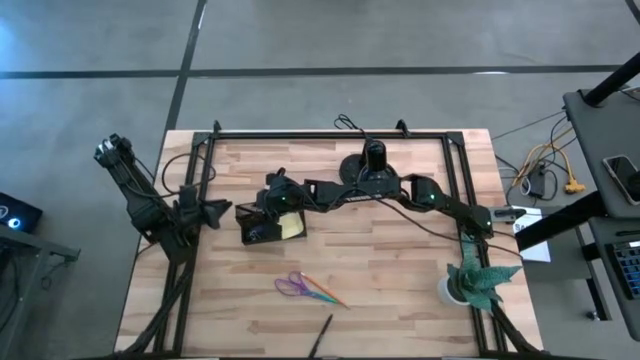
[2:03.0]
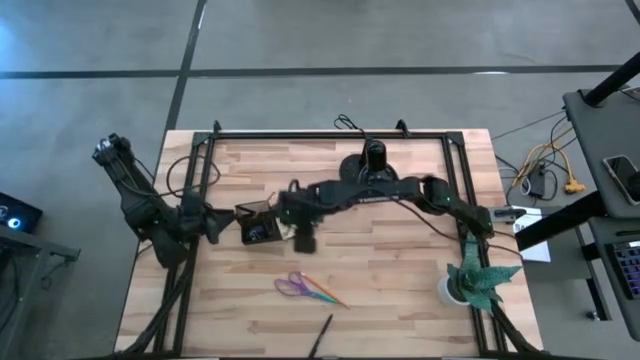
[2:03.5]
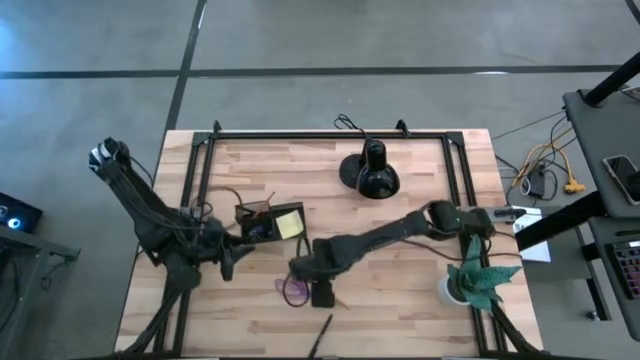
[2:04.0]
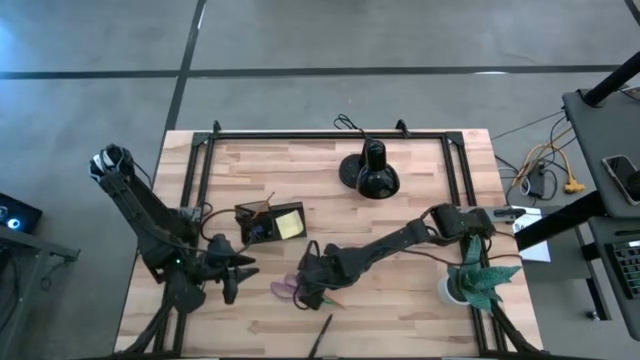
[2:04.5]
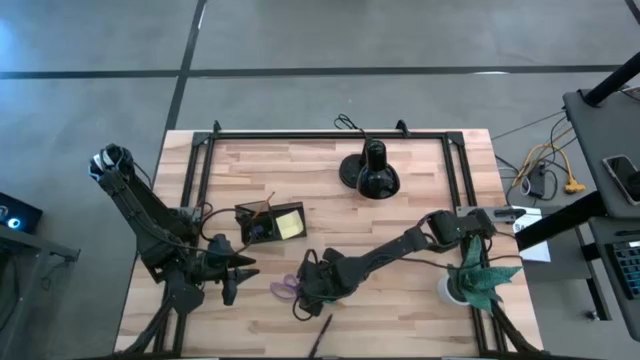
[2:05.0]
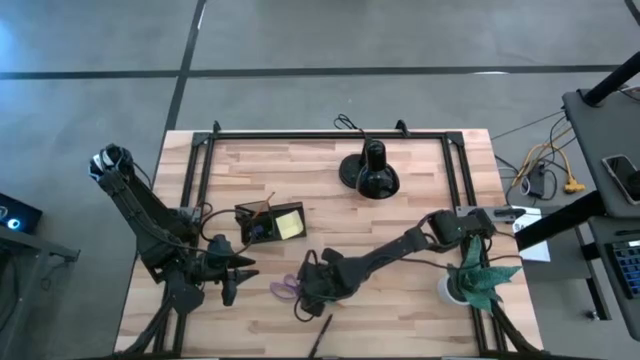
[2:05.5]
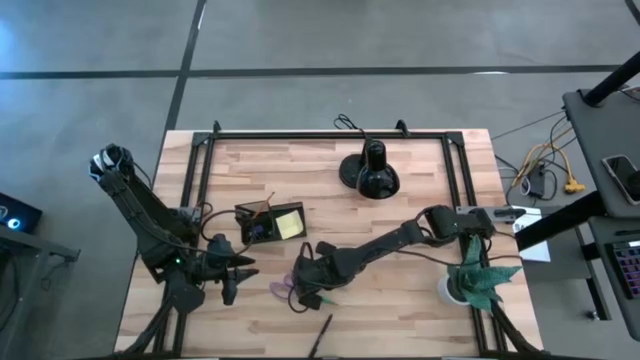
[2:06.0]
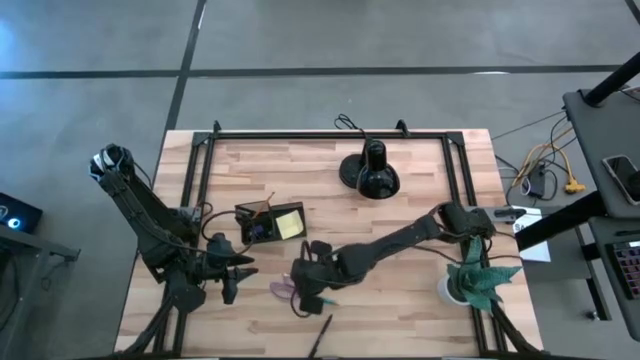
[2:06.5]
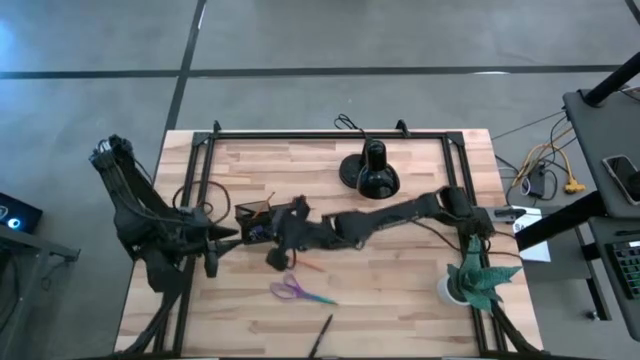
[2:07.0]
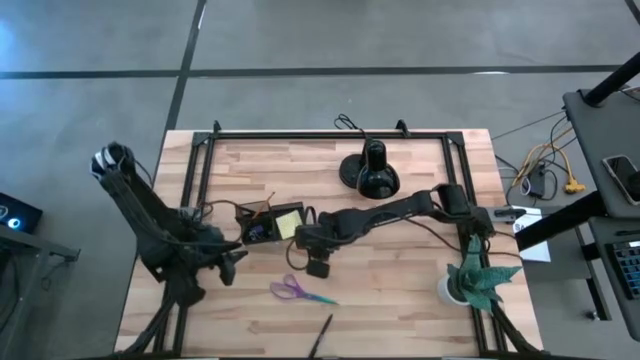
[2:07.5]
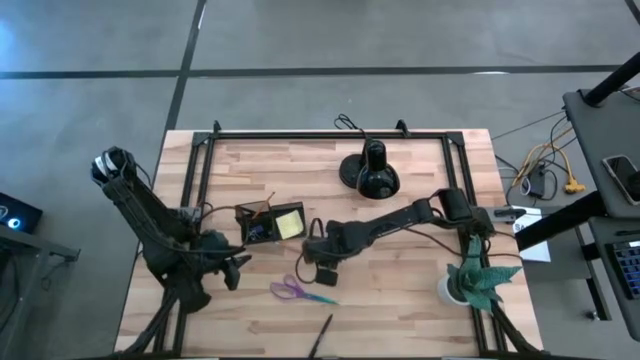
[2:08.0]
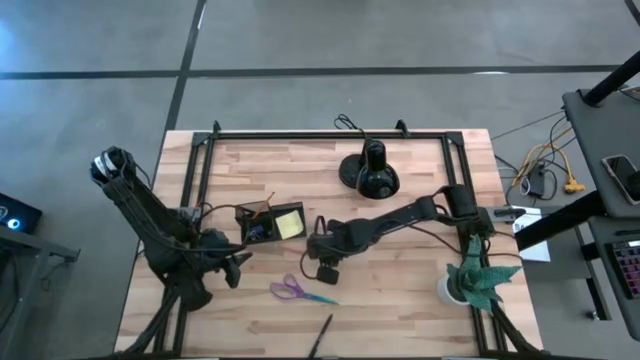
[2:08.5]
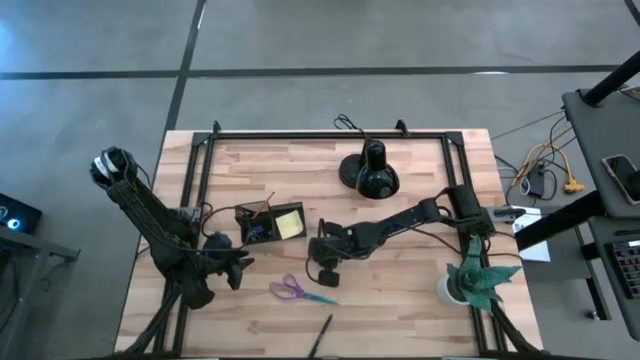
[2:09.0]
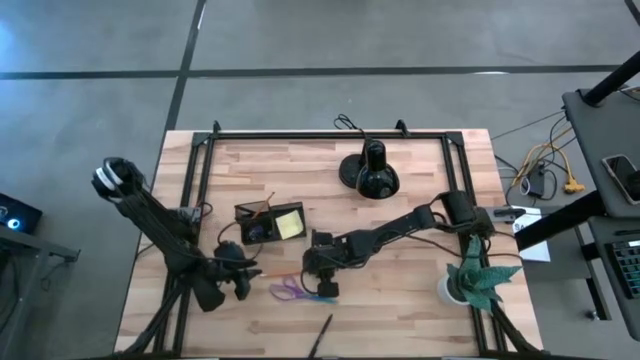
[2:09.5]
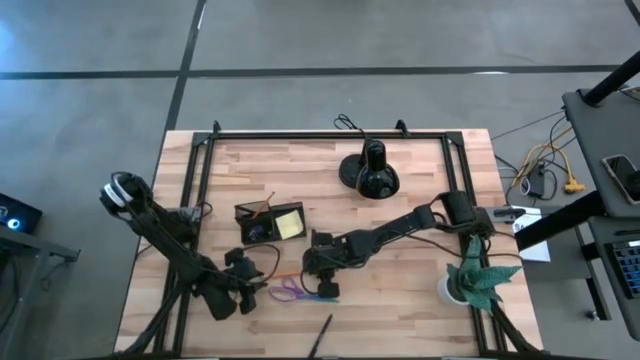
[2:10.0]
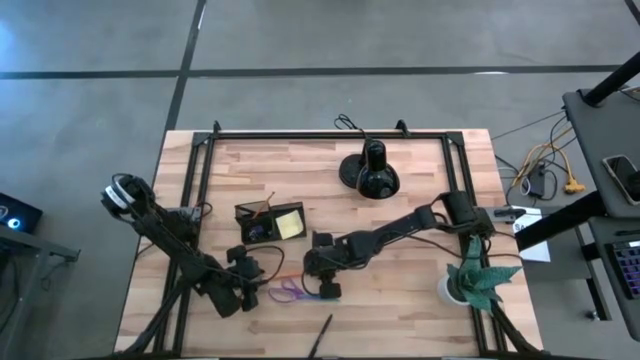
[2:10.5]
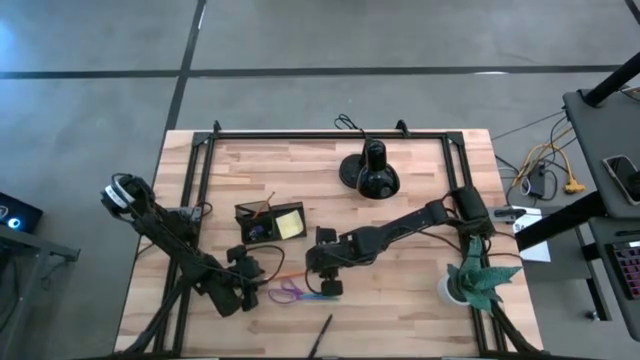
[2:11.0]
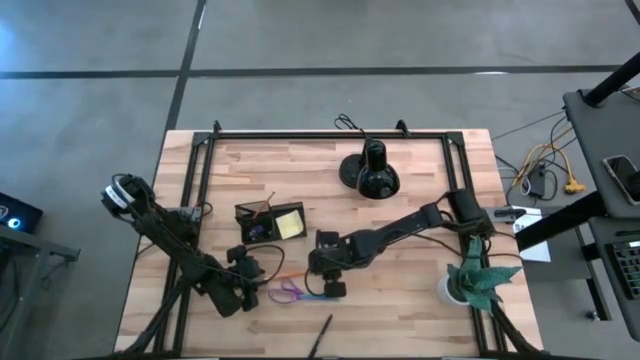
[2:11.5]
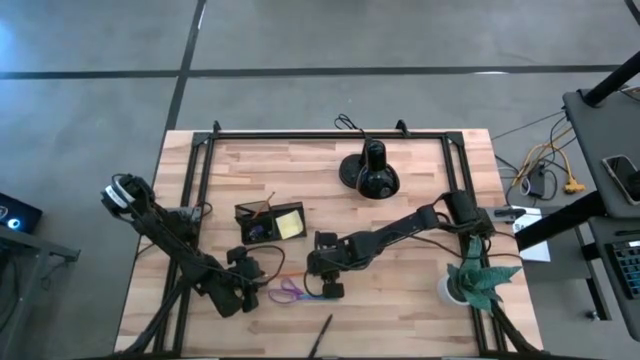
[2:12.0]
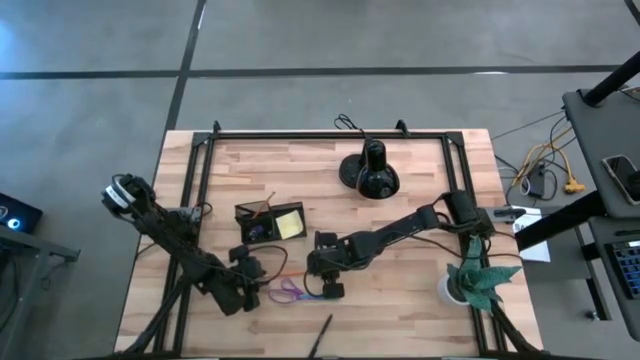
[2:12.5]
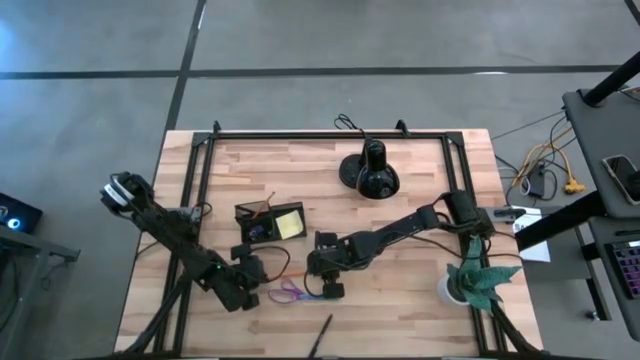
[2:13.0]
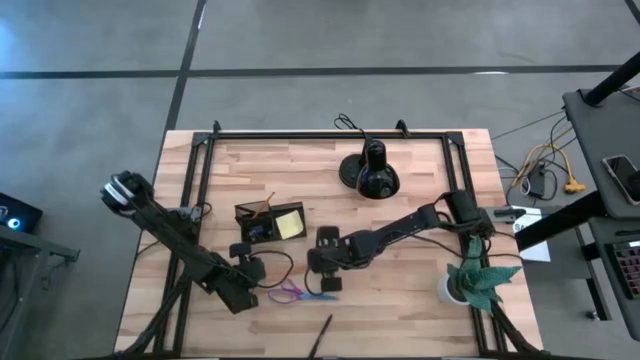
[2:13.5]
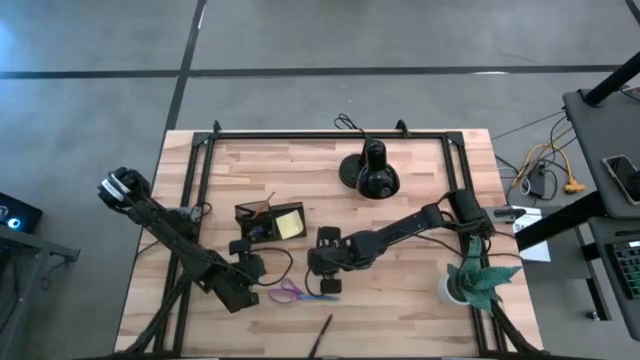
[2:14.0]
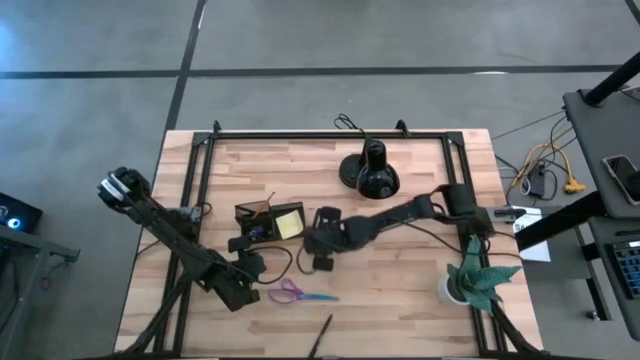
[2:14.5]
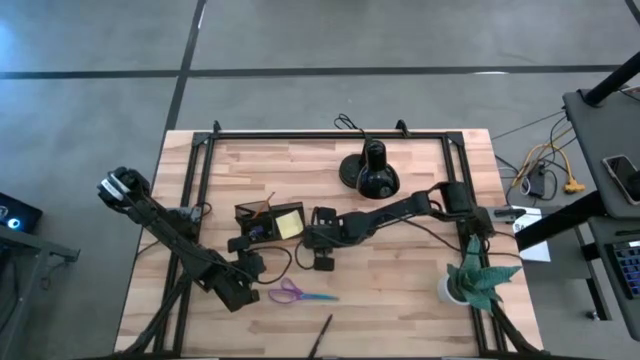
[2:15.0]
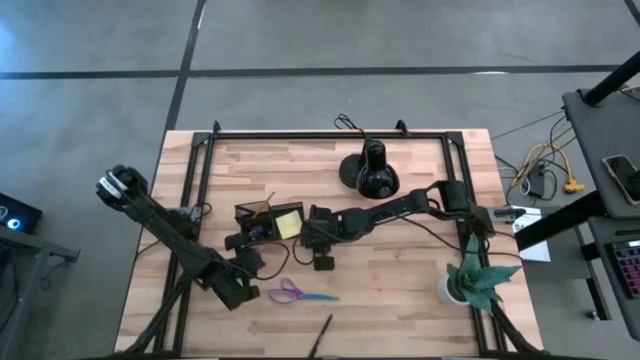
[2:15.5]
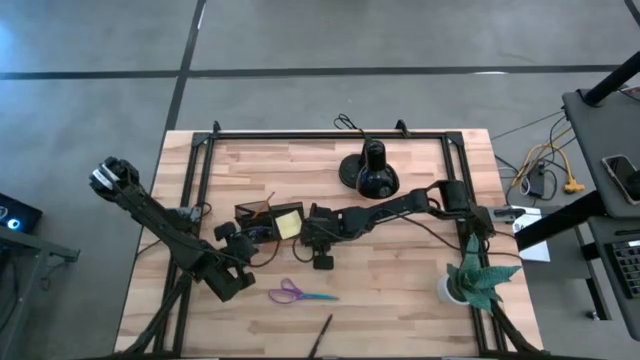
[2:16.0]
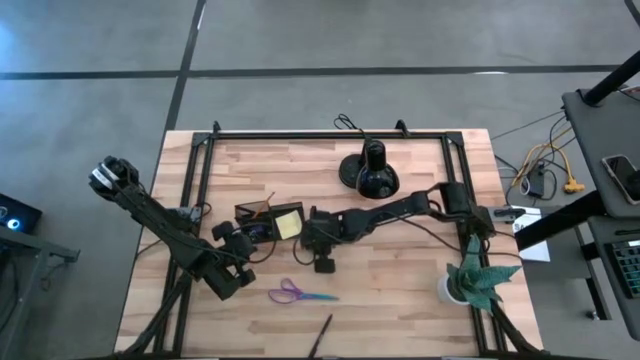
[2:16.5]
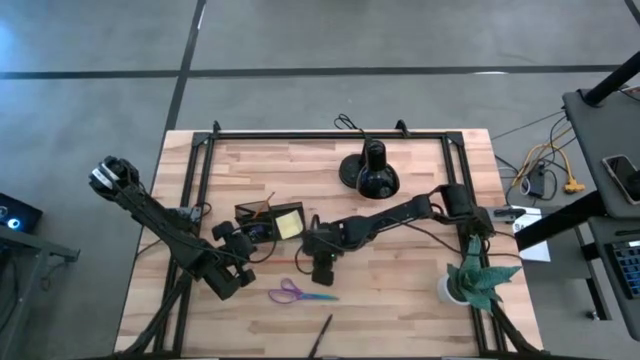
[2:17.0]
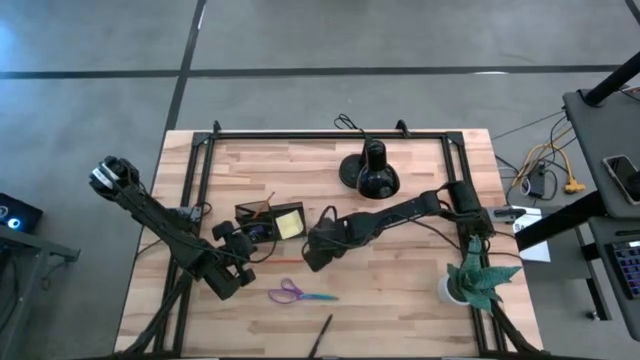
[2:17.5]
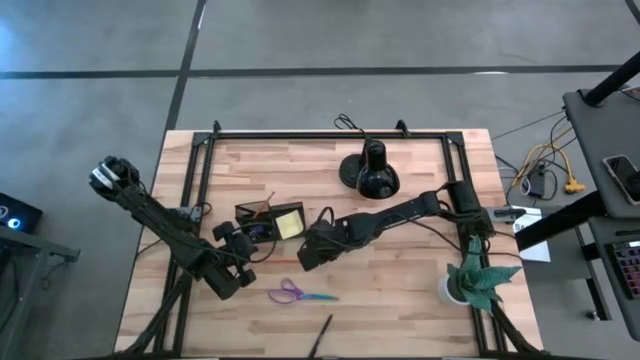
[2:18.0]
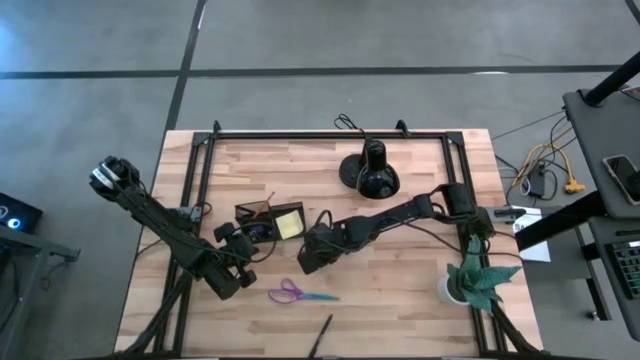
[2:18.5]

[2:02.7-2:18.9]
Task: Pick and place office supplies into organizer
Put the yellow pencil into the black desk organizer

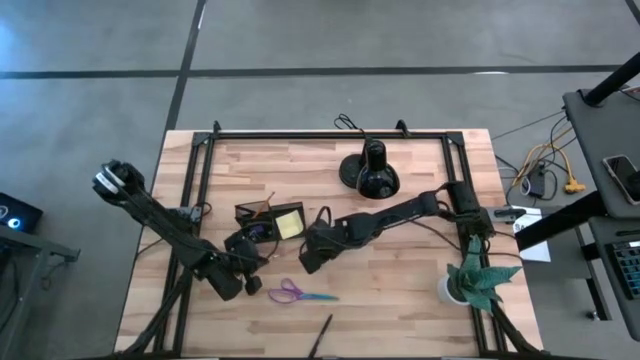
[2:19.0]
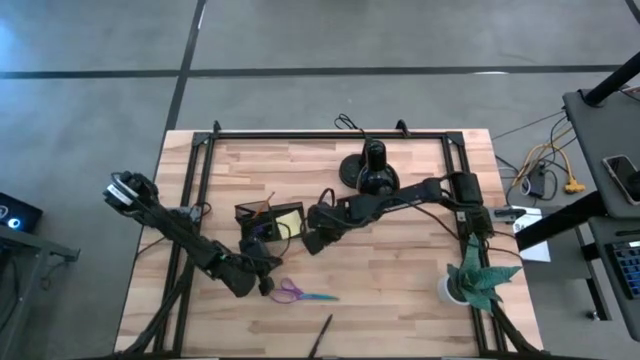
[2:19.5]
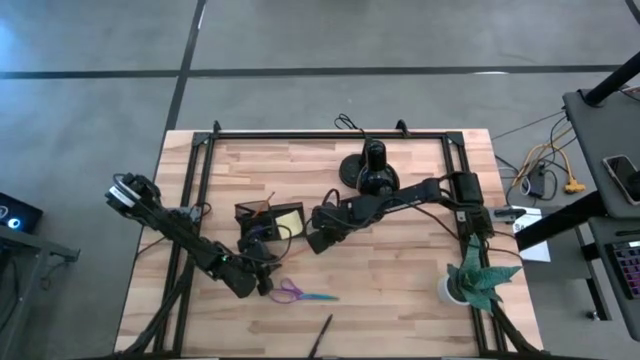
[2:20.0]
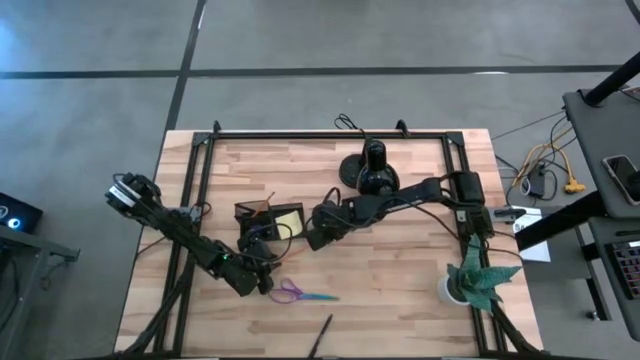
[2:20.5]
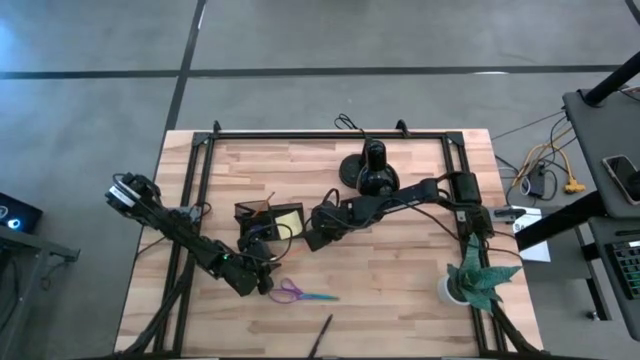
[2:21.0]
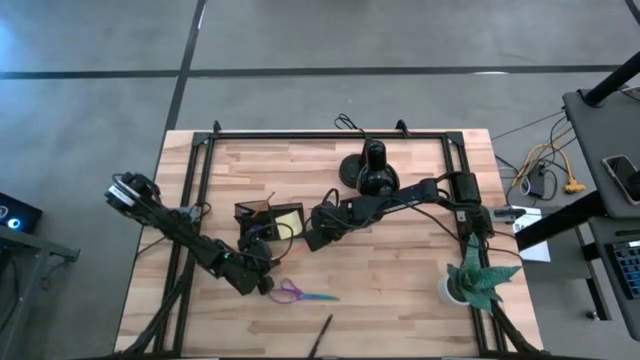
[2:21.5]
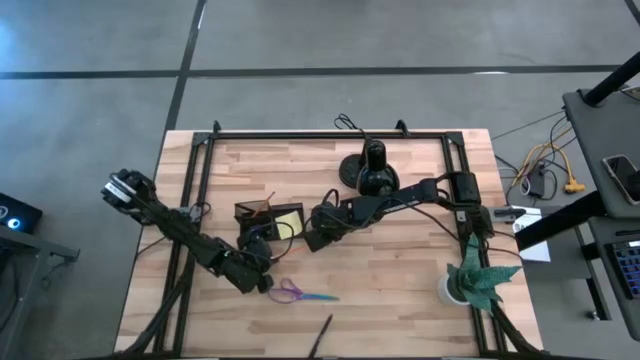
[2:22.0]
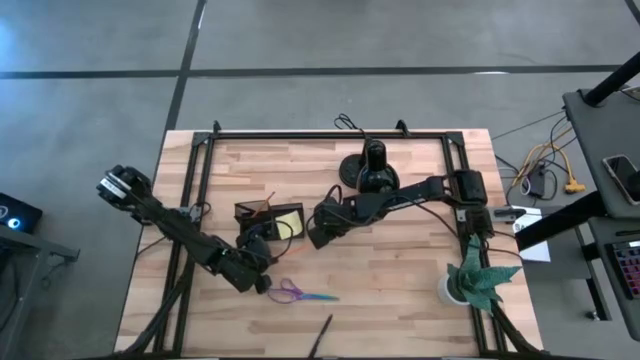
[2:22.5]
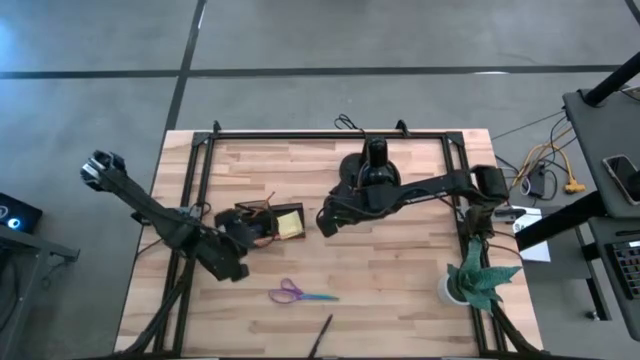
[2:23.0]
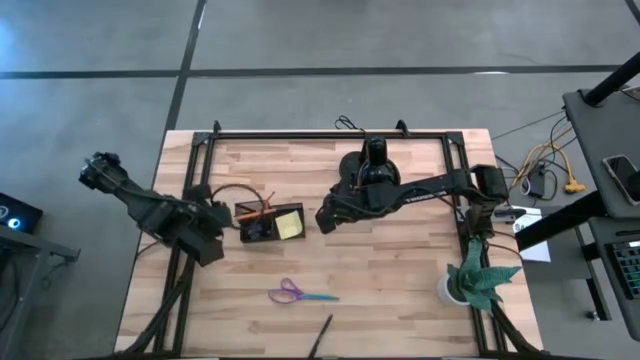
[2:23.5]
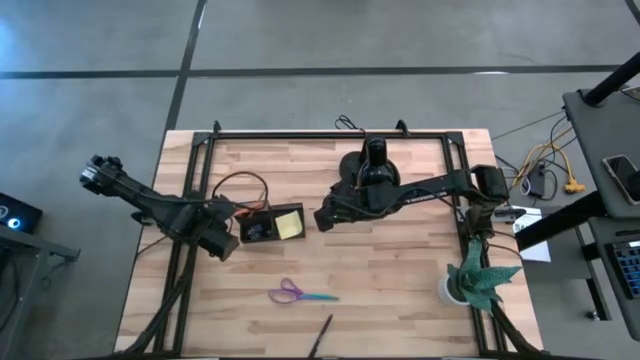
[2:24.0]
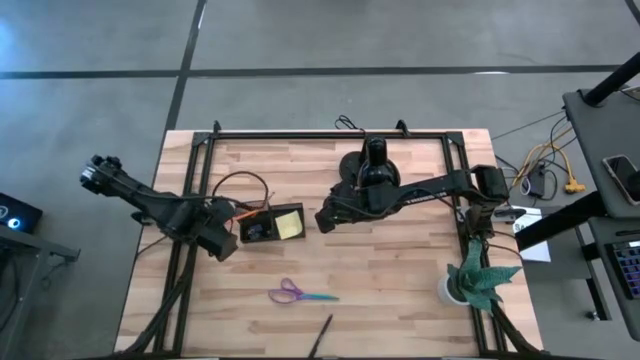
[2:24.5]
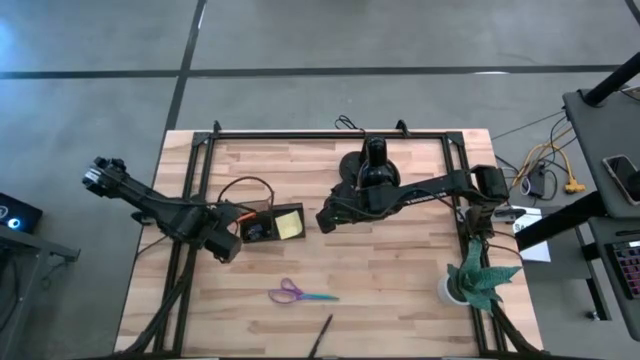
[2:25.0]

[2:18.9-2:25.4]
Put the yellow pencil into the black desk organizer
